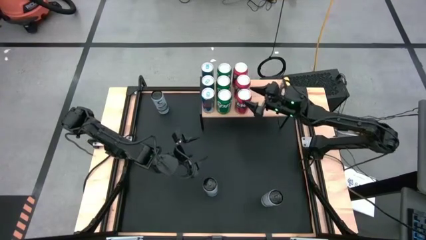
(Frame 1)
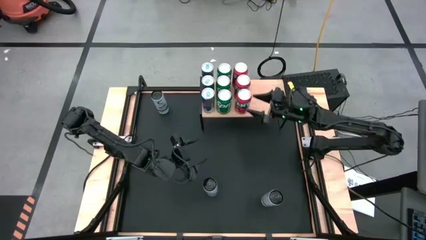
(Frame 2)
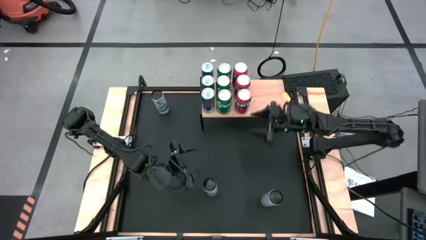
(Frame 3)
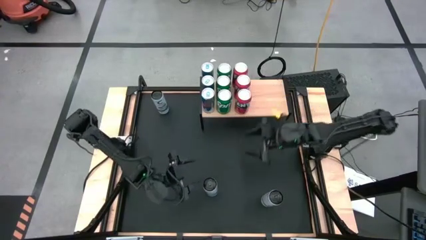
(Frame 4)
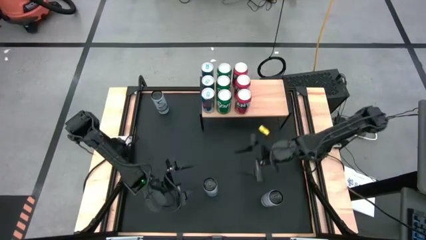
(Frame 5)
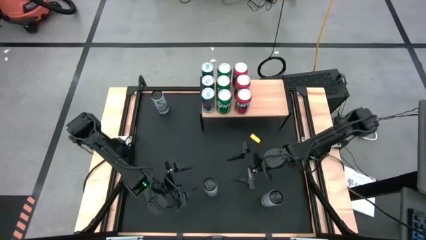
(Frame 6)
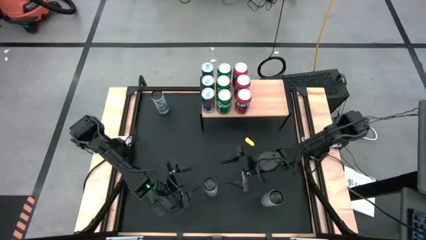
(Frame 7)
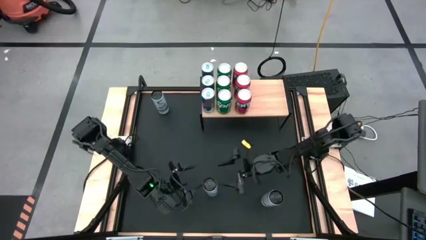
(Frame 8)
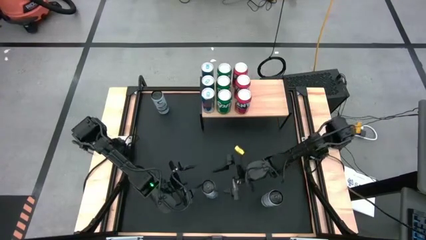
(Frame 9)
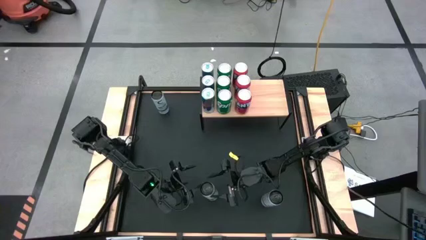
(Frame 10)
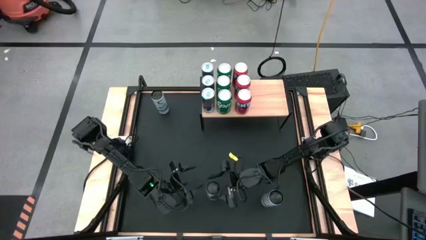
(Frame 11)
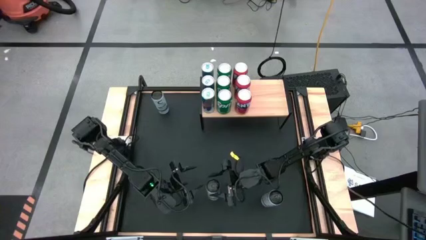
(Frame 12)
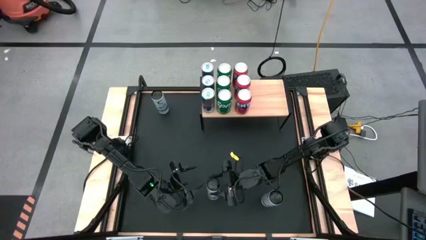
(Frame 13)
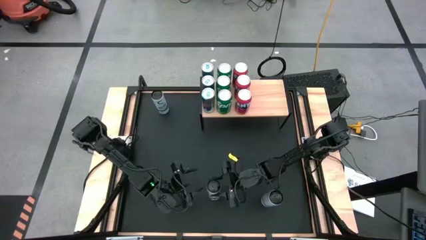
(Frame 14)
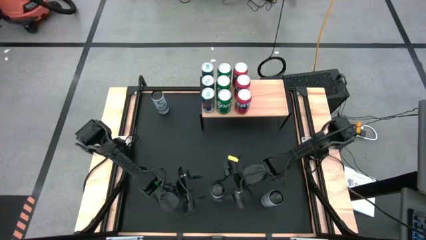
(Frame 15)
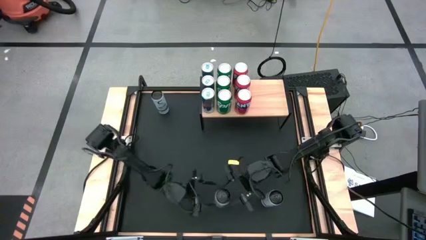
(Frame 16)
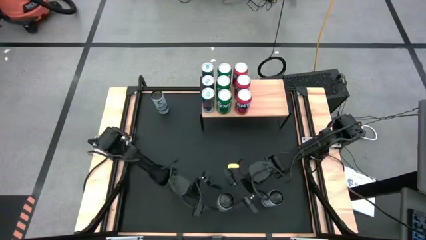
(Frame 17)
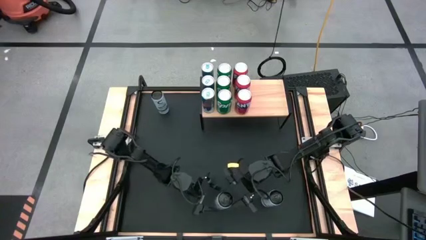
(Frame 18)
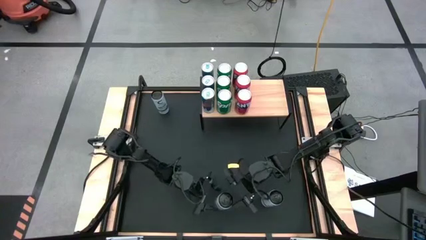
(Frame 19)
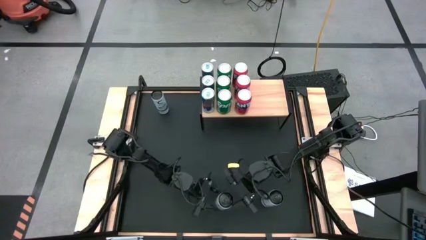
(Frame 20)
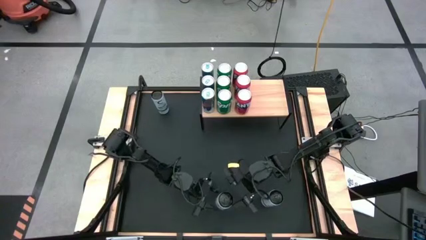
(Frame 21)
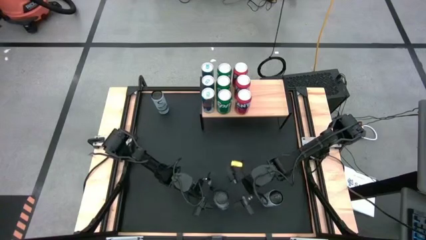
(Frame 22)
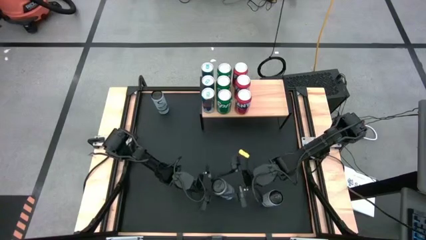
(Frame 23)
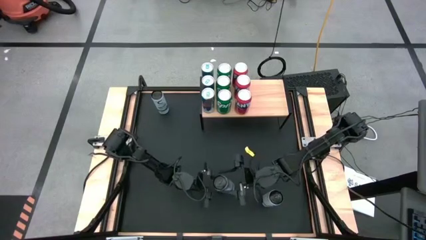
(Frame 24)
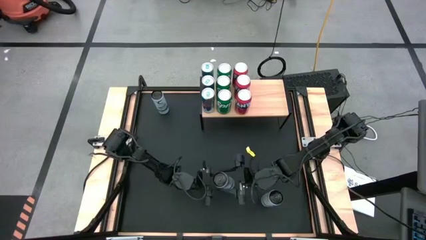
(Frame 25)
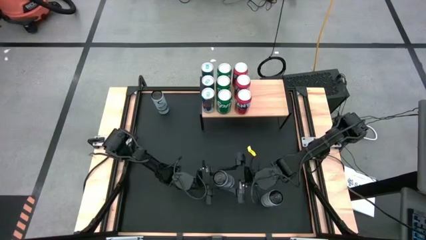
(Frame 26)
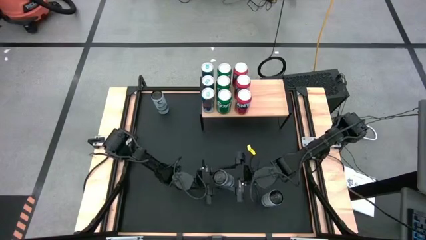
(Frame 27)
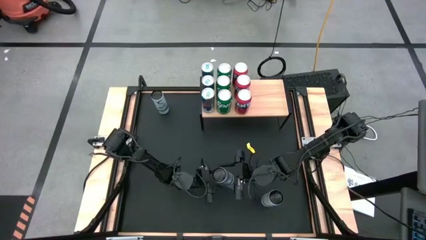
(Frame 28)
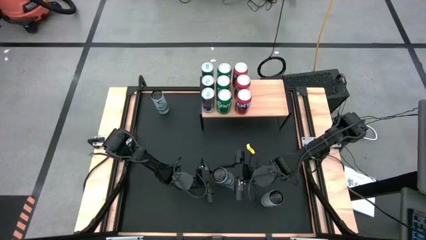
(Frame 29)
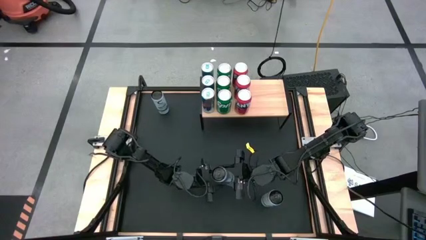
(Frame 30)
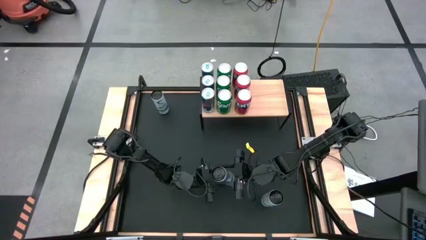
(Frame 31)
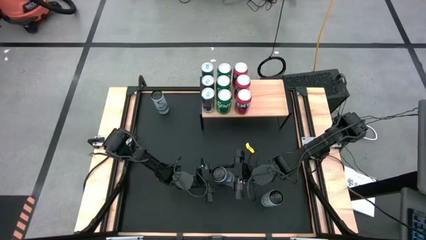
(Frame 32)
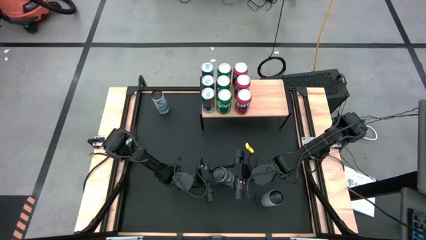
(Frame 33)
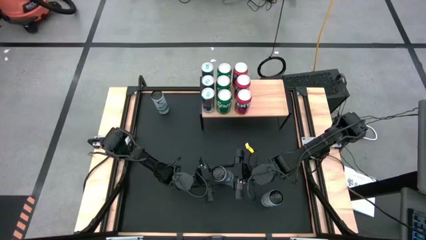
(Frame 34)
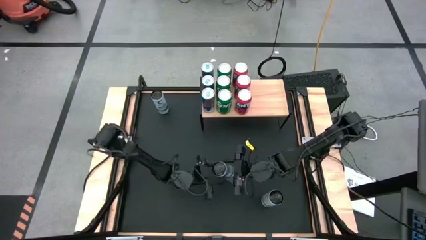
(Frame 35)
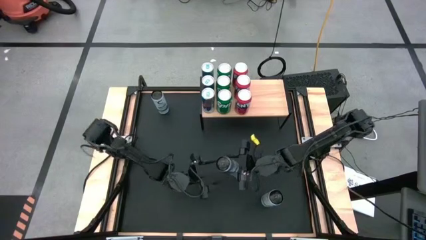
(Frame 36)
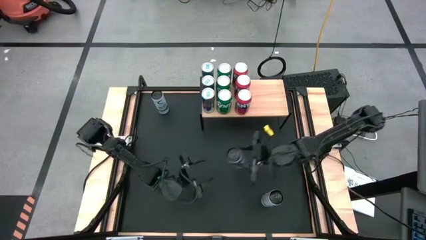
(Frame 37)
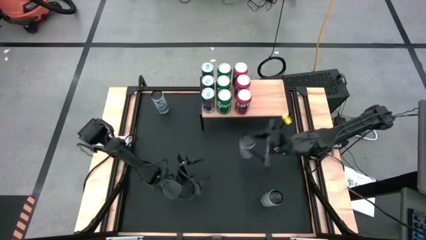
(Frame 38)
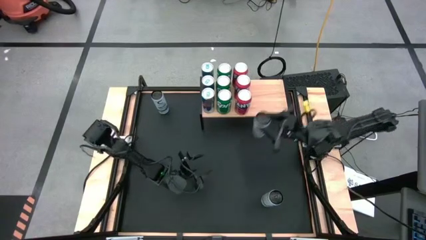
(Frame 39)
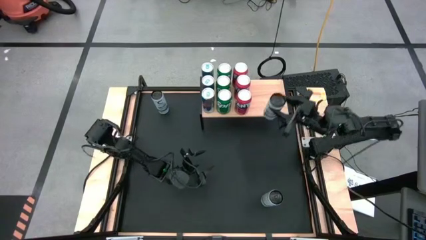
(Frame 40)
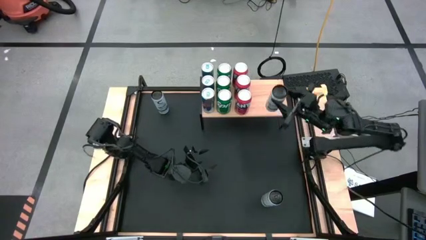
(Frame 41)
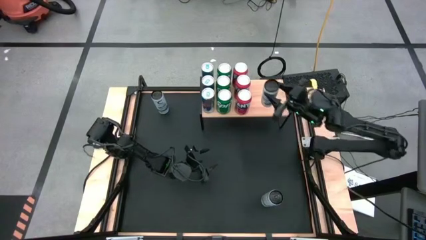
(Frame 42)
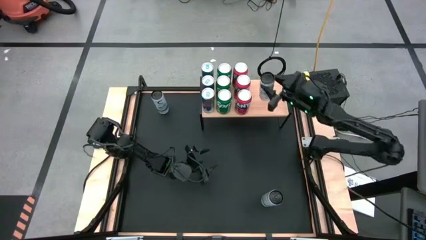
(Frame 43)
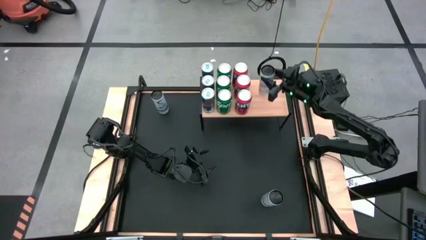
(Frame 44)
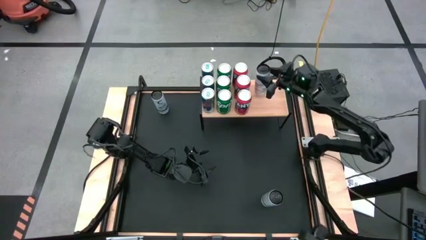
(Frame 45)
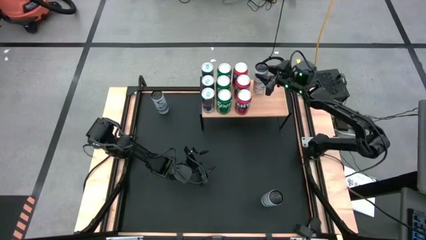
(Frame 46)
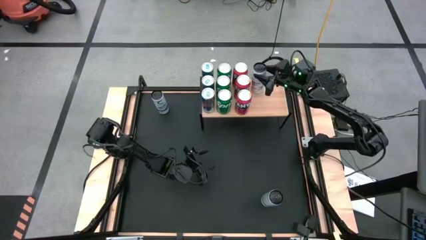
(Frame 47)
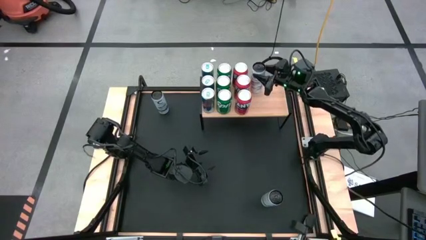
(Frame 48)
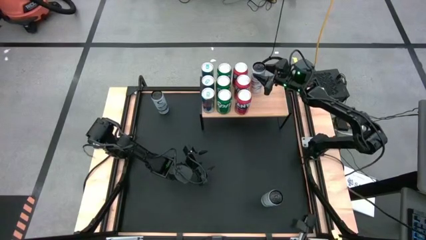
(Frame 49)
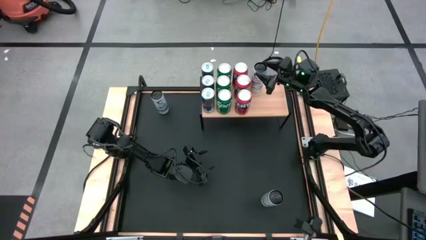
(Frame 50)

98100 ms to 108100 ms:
Task: Place canned beverage on shelf
Put the bottom left white blue soda can on the shelf

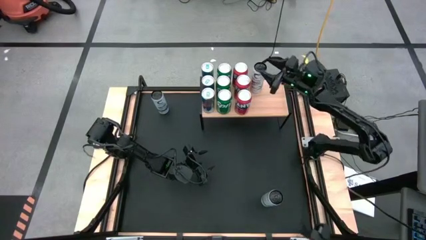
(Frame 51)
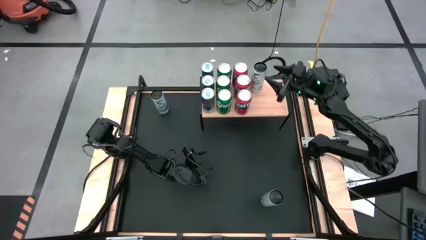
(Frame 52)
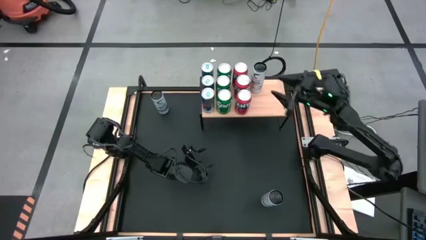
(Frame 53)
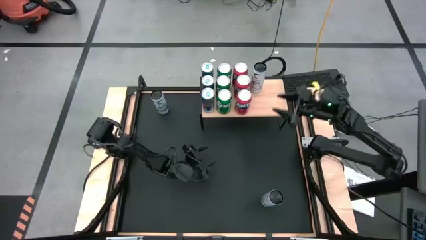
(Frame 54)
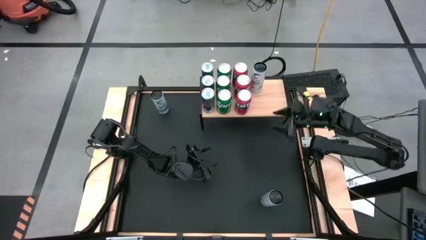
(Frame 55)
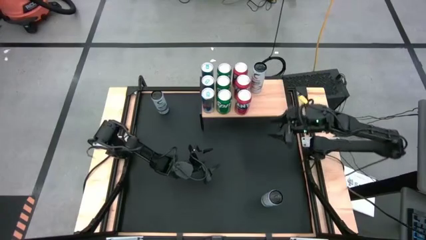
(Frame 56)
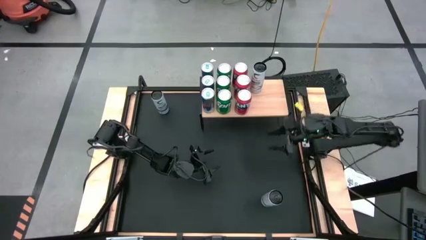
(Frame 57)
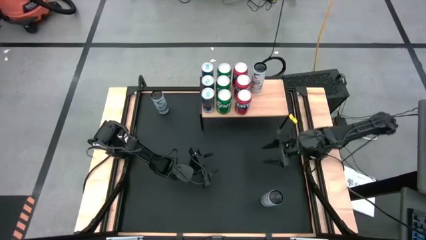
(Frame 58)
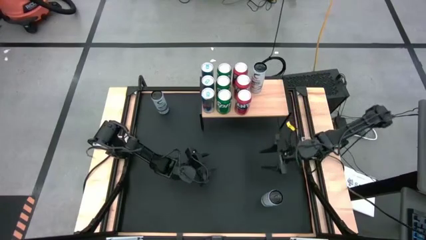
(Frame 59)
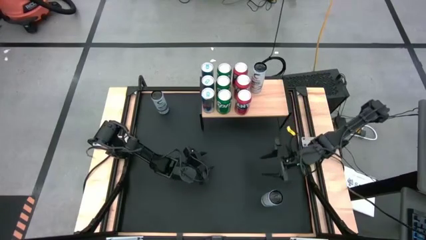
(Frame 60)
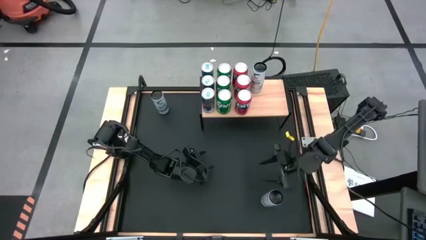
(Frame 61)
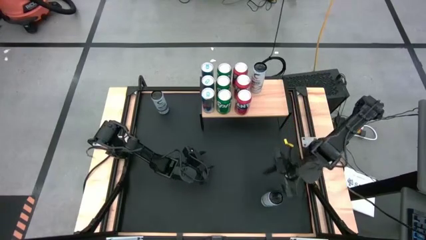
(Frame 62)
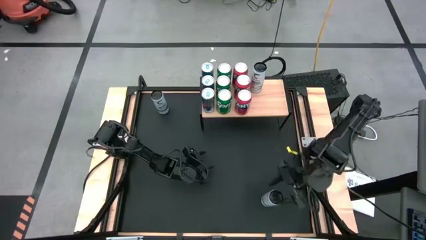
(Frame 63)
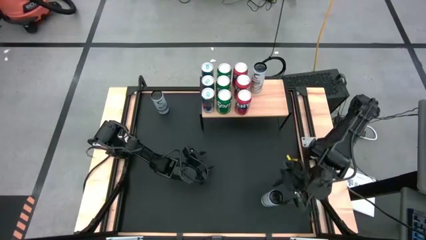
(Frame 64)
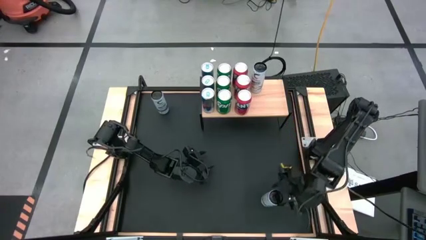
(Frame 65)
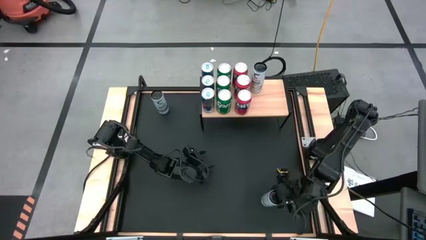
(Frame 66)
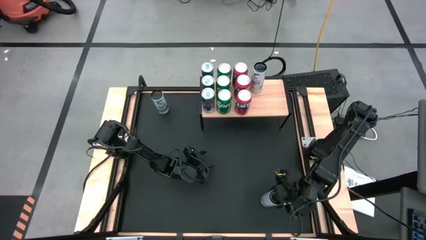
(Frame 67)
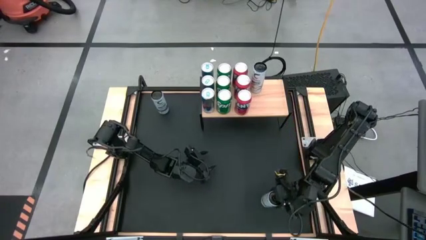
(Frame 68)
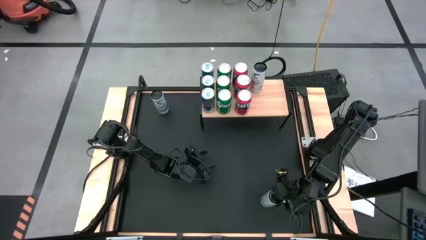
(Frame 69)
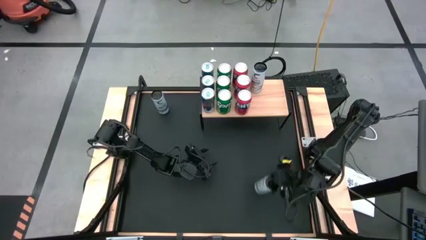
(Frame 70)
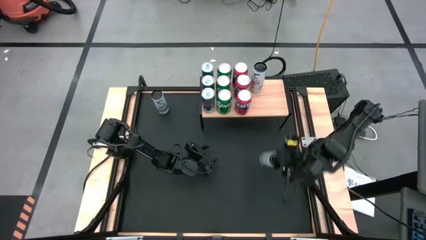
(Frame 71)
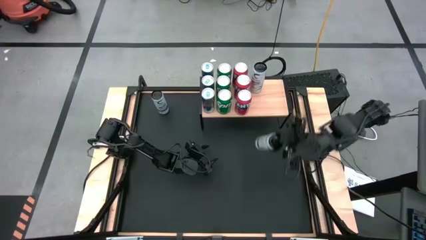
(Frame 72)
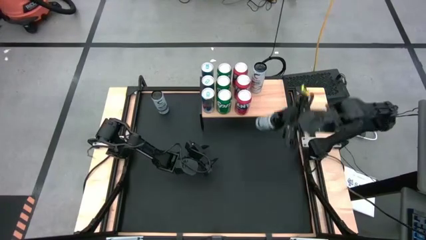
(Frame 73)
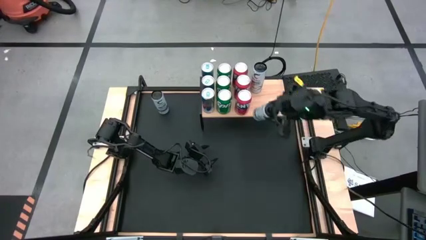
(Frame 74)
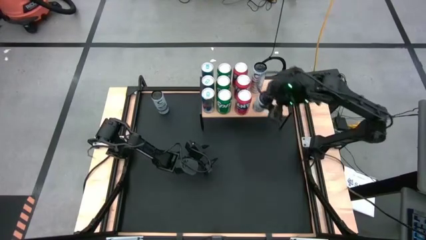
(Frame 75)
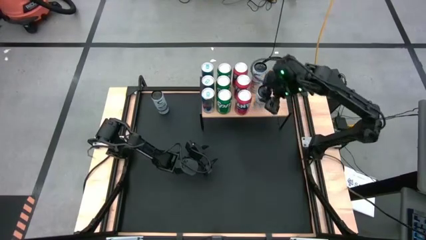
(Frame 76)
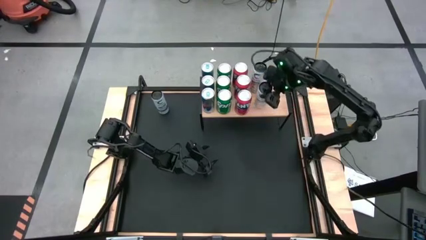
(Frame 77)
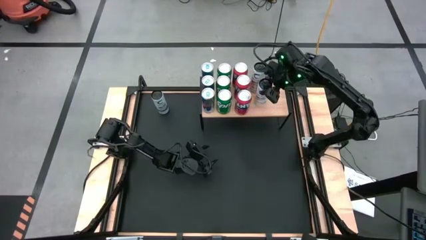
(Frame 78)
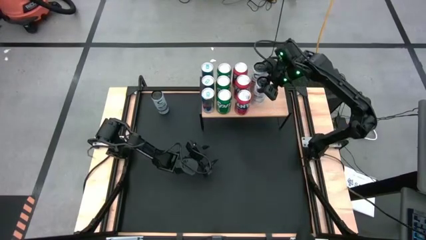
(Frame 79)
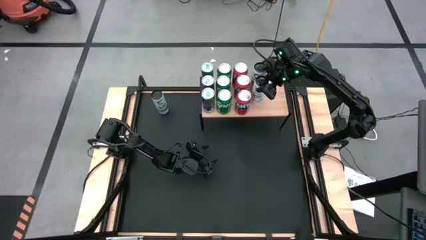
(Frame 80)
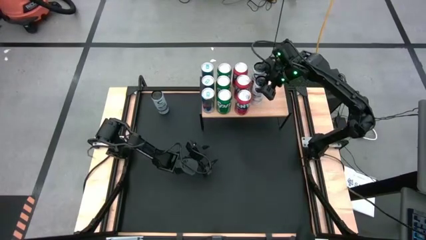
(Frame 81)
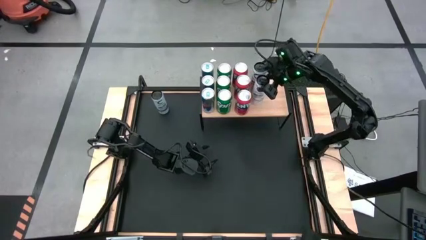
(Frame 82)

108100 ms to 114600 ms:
Put the bottom white blue soda can on the shelf aligned with the other white blue soda can
